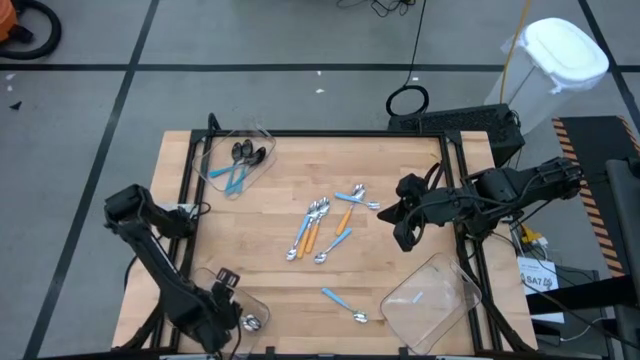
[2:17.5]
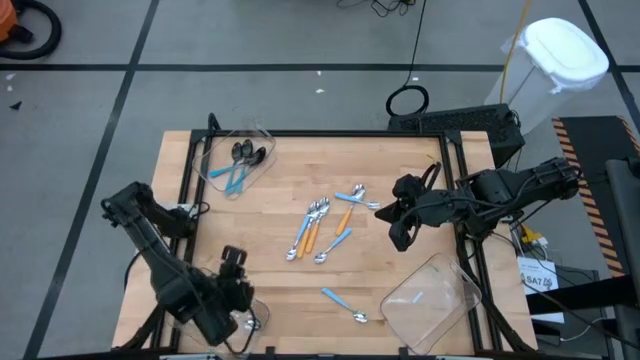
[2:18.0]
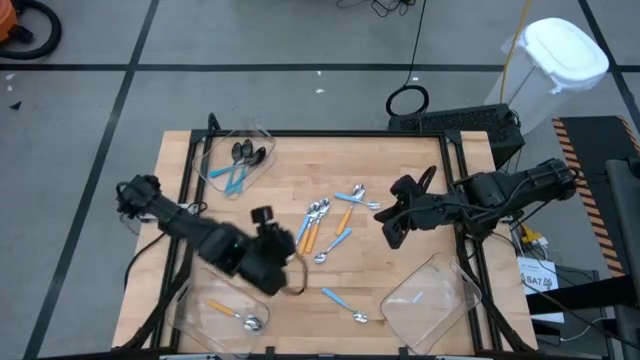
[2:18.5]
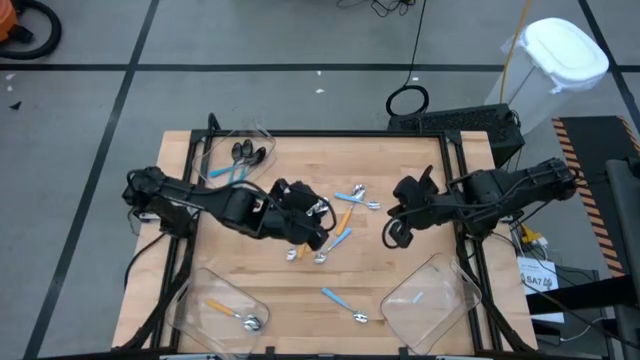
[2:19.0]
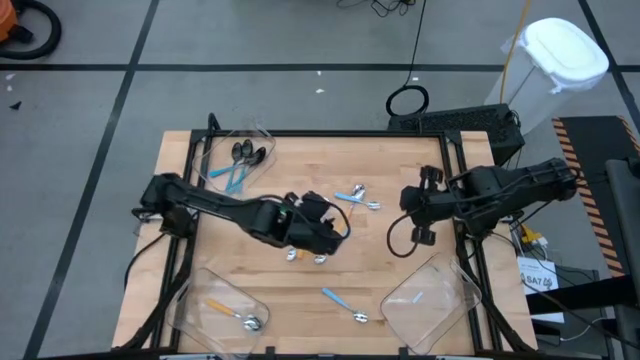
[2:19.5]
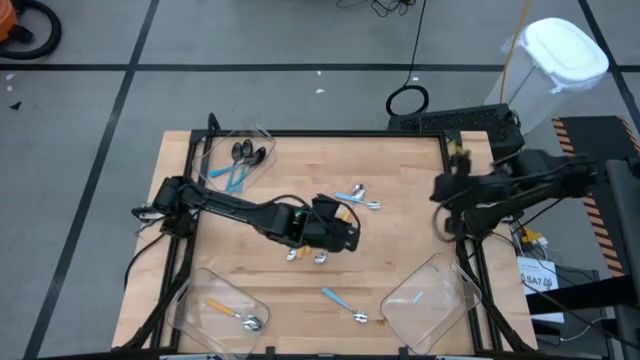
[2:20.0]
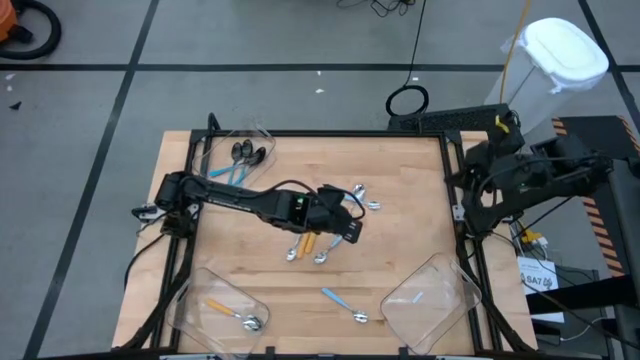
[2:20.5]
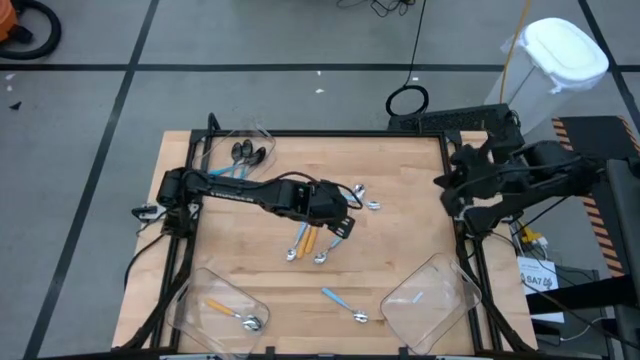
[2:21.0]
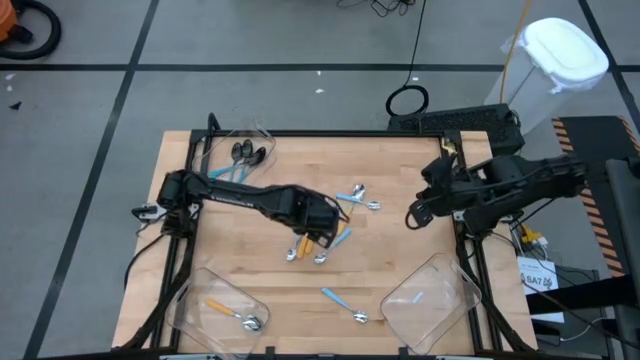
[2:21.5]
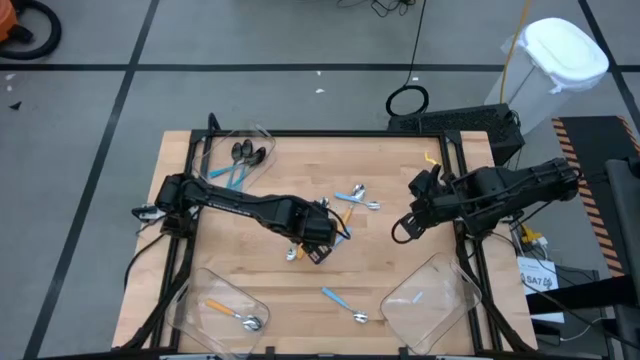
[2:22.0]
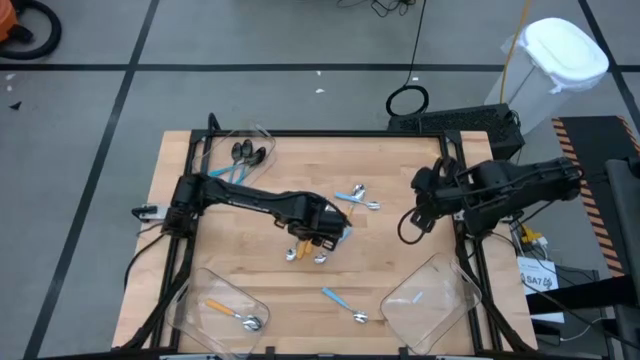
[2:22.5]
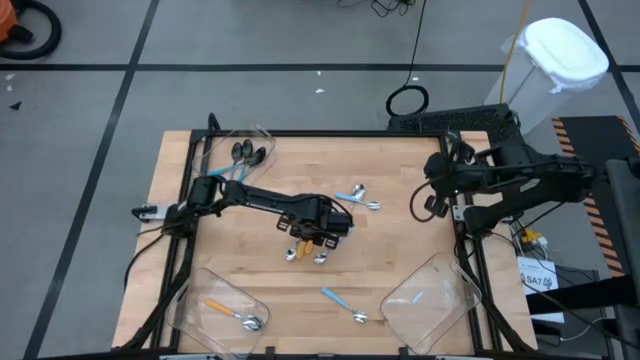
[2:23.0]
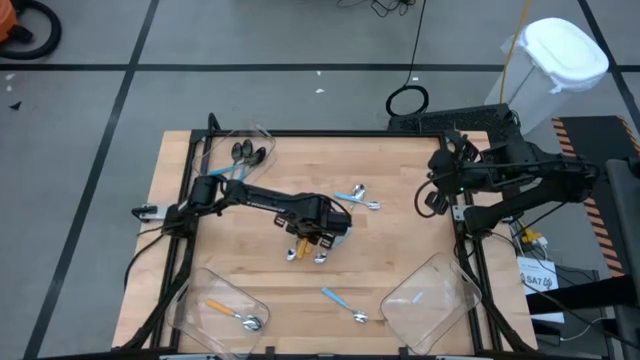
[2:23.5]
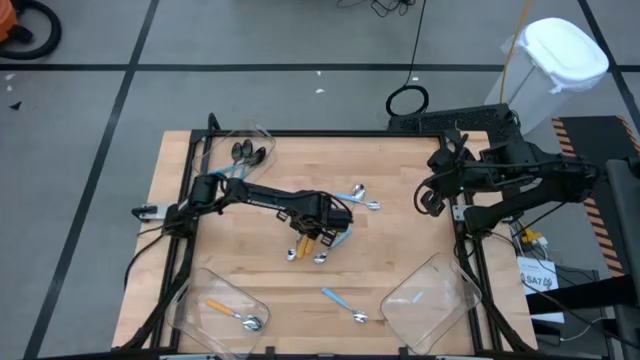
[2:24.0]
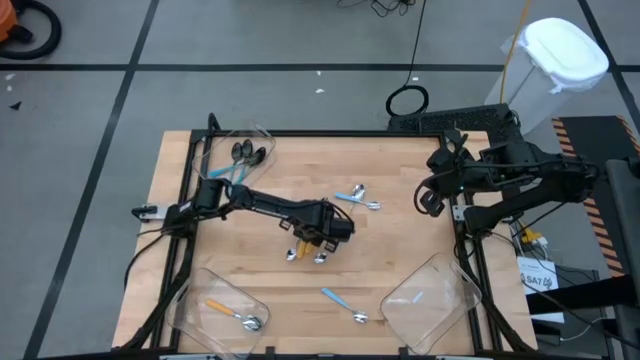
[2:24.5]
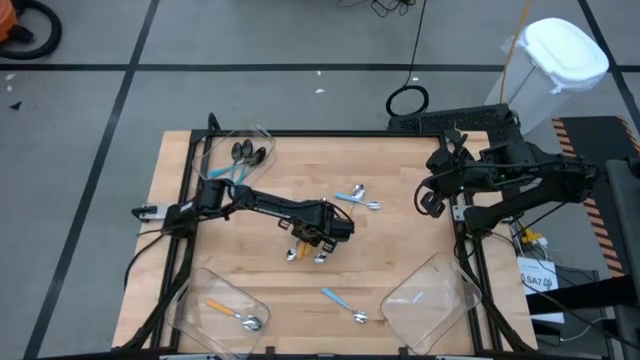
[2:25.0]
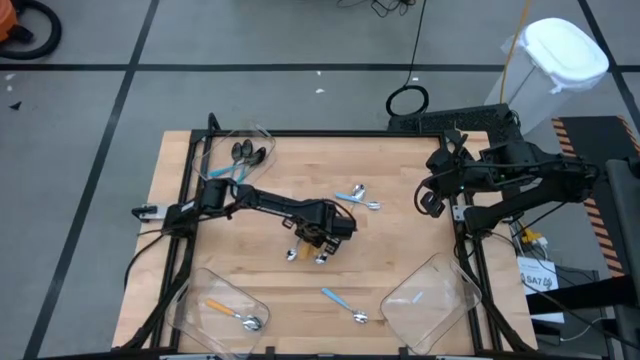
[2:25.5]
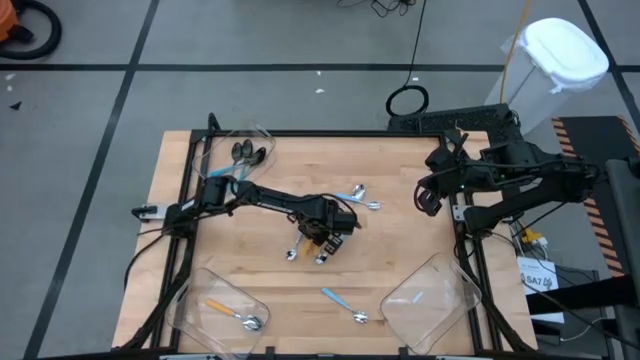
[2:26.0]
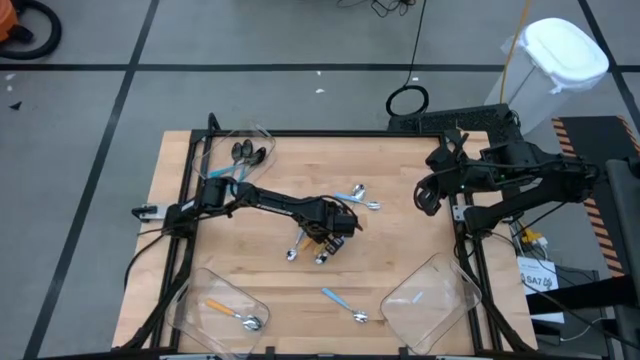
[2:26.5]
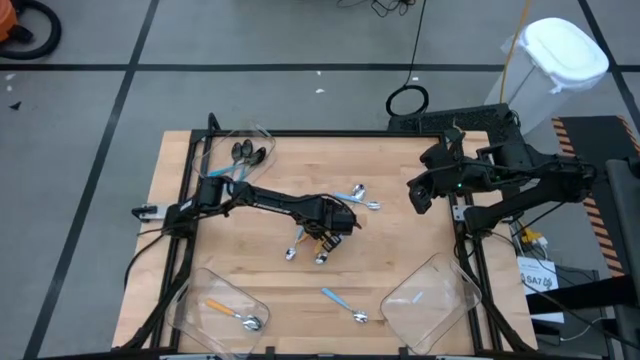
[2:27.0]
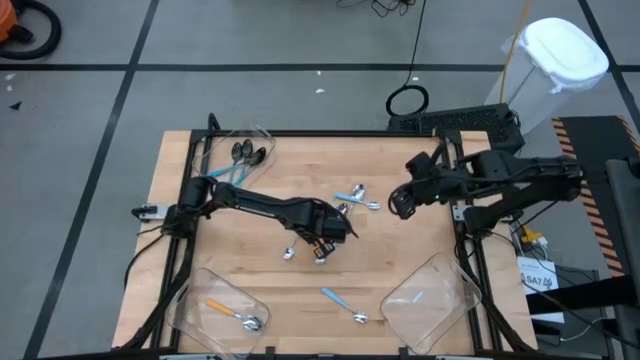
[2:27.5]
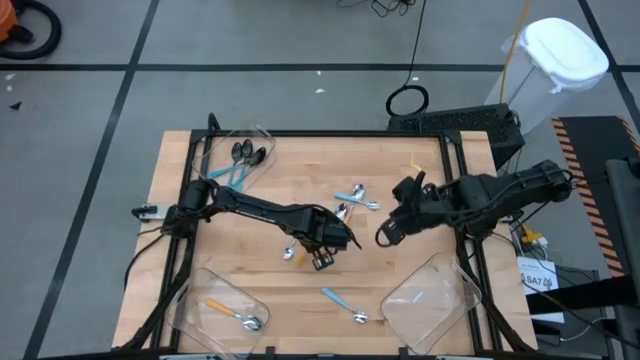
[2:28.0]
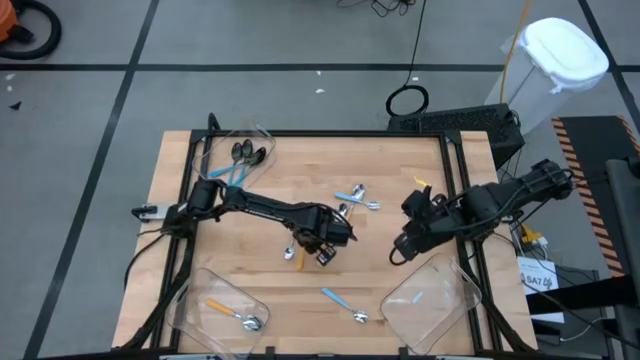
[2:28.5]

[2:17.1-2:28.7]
Task: Sort silverware by color (type)
Put the yellow spoon into the bottom left transparent bin

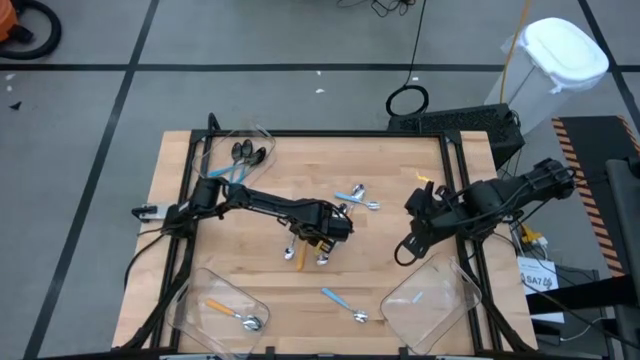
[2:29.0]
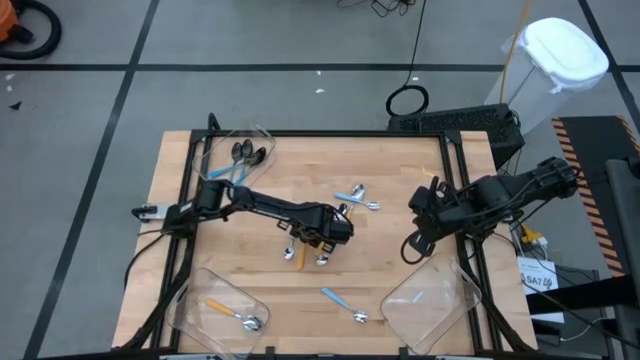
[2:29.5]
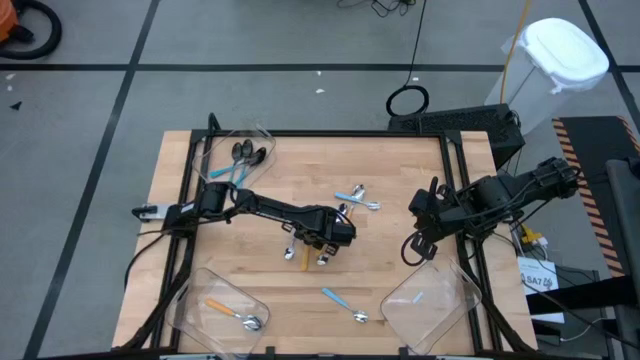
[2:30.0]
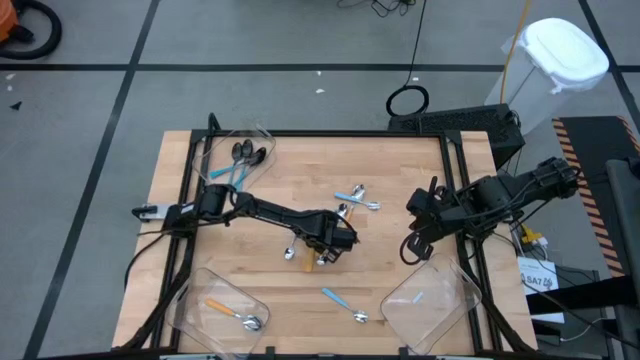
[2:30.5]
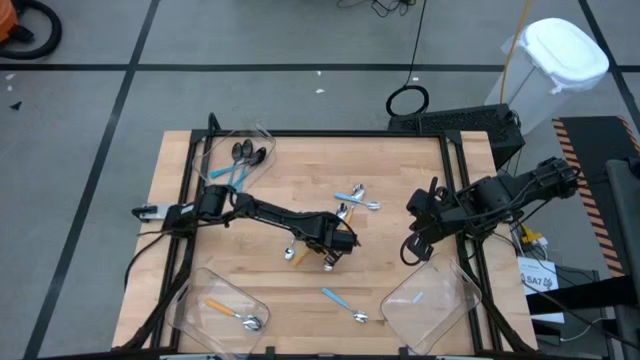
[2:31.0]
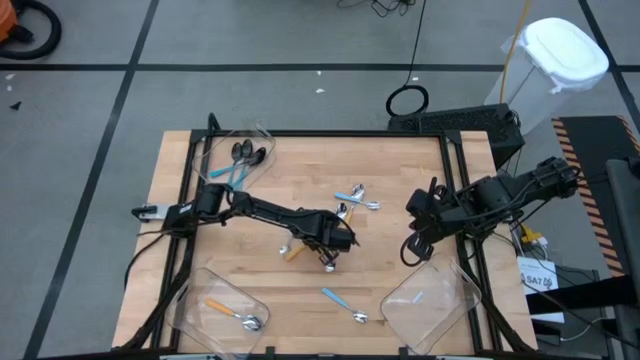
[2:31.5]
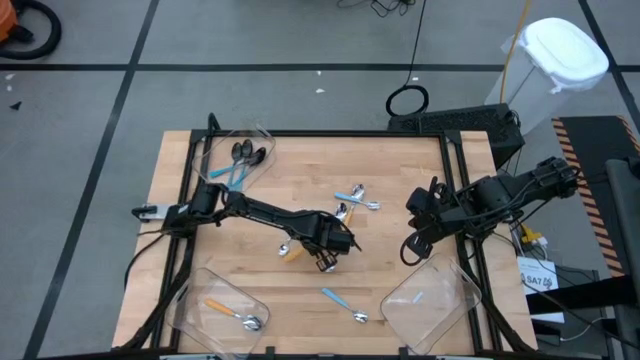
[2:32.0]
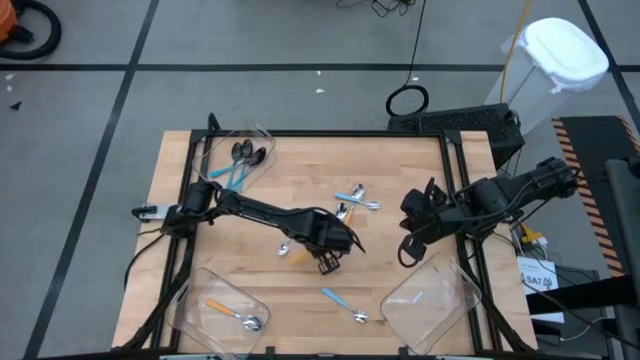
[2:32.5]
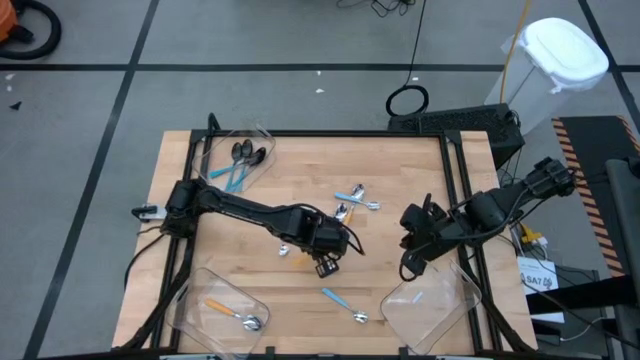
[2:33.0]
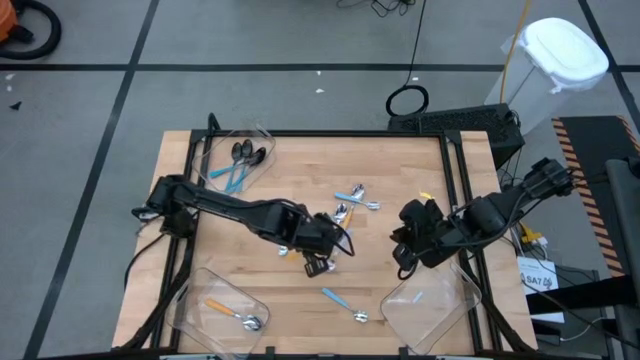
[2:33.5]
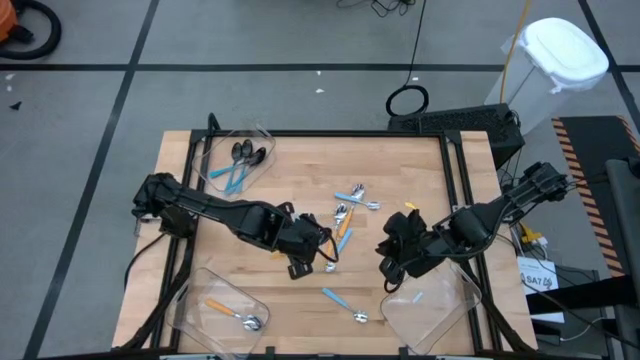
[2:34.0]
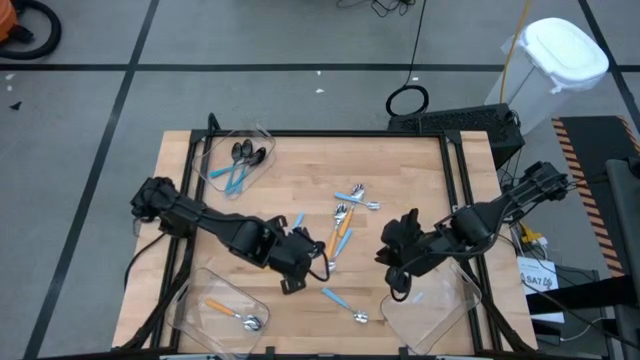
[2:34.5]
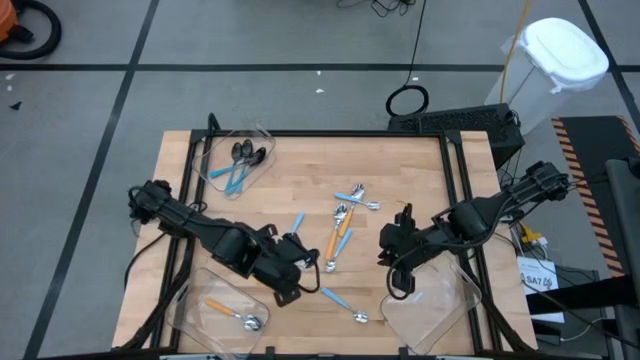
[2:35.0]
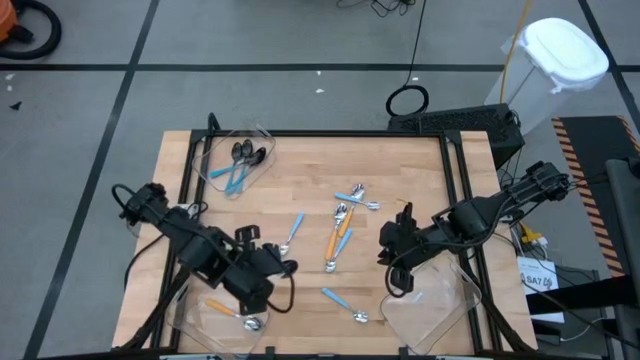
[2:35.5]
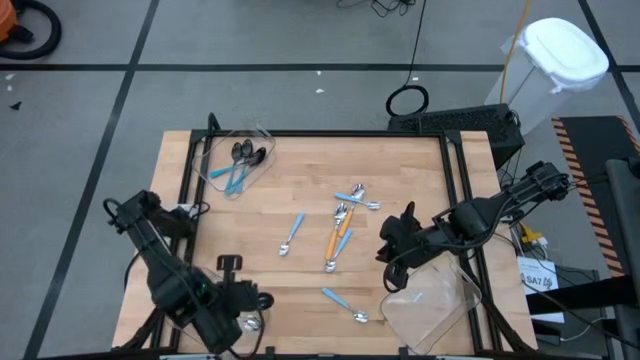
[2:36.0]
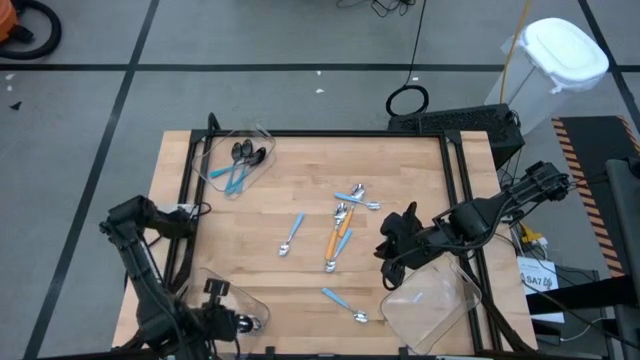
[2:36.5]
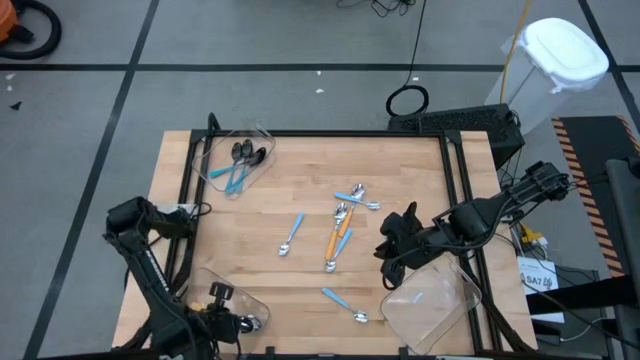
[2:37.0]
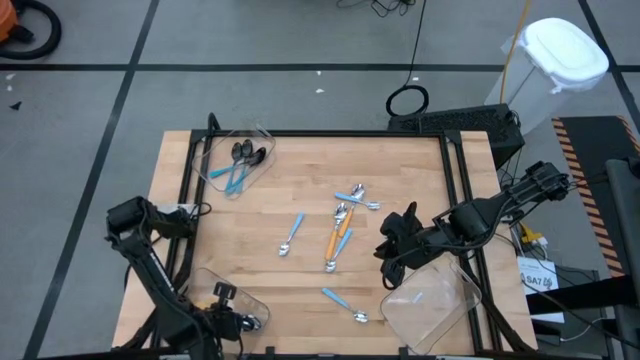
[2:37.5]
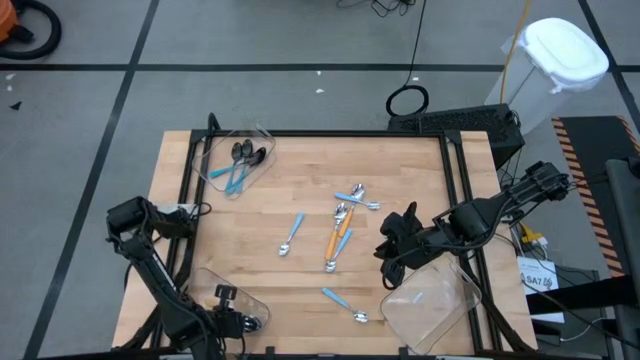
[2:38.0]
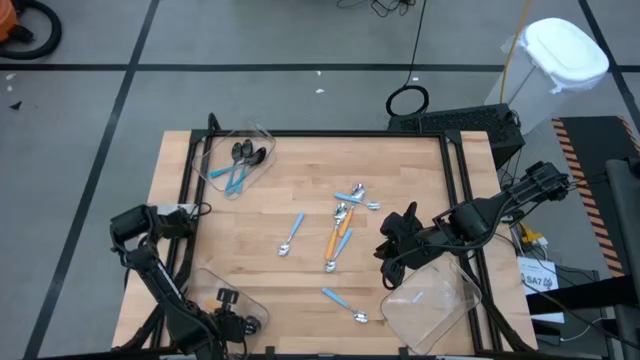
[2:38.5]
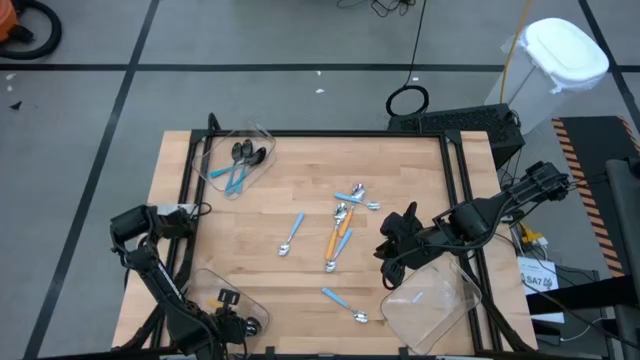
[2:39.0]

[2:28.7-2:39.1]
Put the yellow spoon into the bottom left transparent bin
